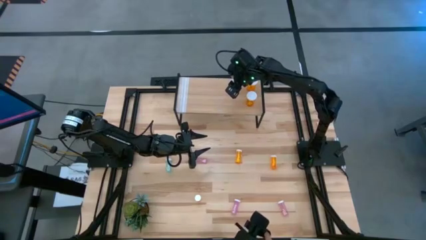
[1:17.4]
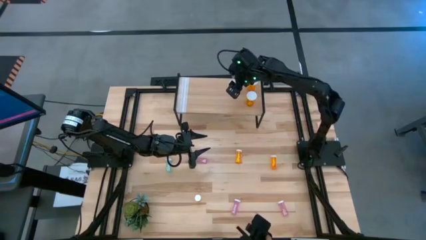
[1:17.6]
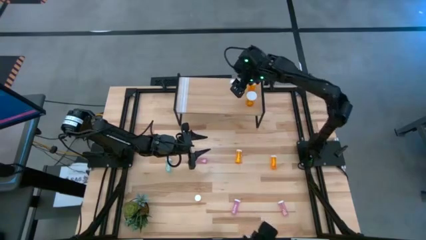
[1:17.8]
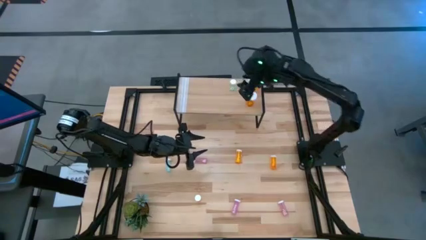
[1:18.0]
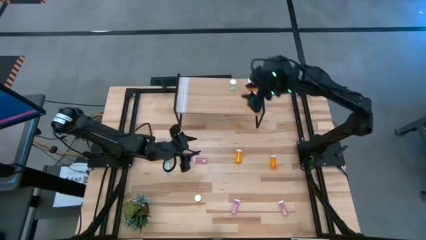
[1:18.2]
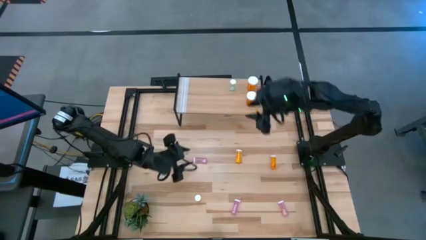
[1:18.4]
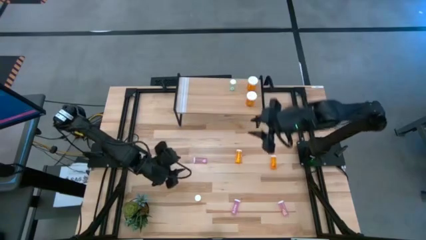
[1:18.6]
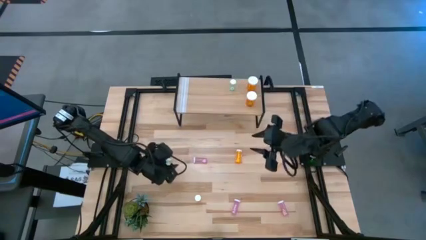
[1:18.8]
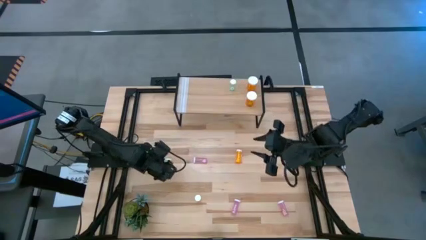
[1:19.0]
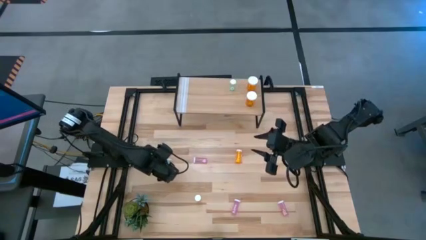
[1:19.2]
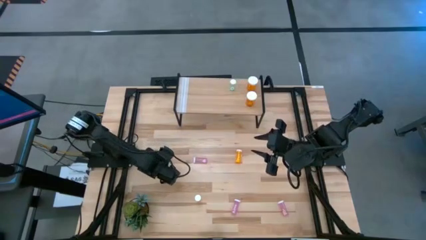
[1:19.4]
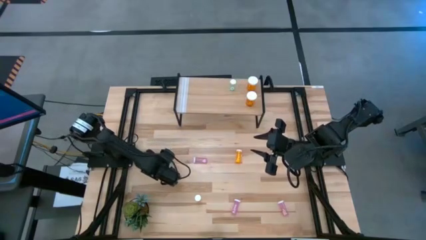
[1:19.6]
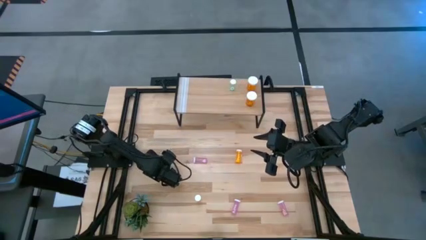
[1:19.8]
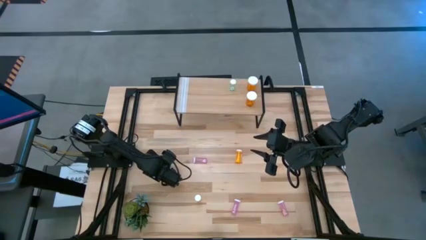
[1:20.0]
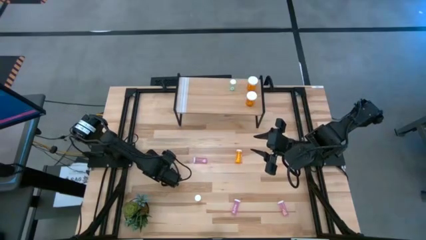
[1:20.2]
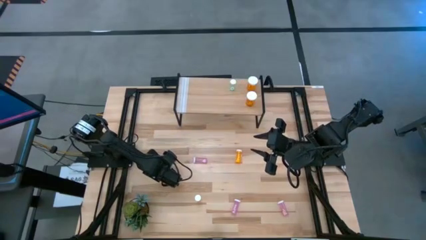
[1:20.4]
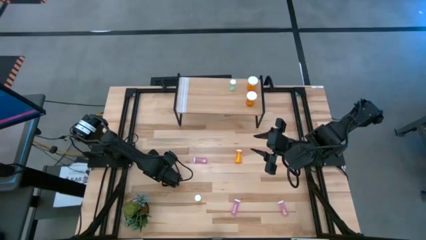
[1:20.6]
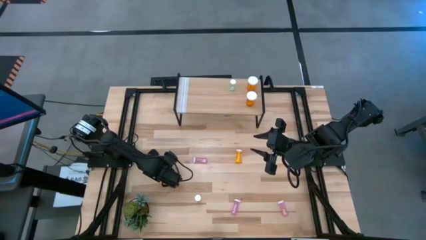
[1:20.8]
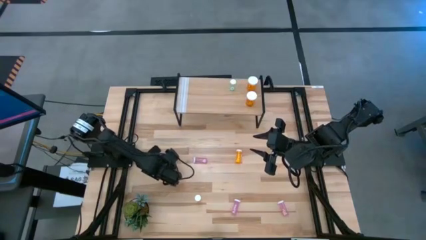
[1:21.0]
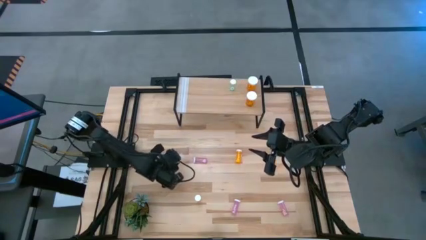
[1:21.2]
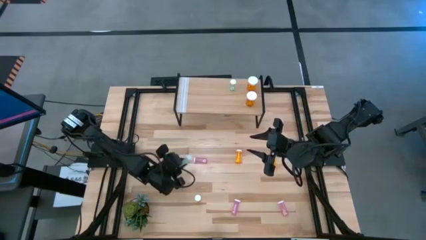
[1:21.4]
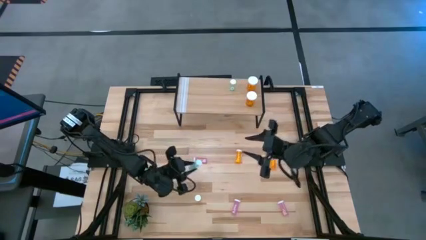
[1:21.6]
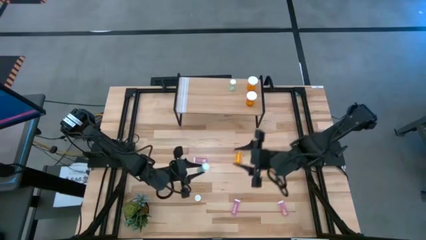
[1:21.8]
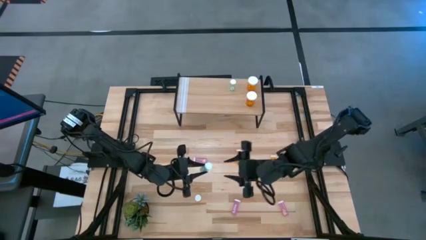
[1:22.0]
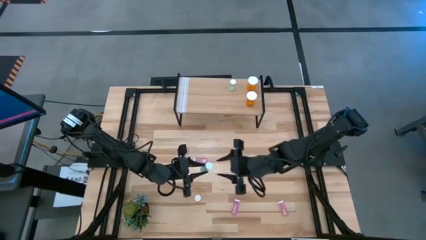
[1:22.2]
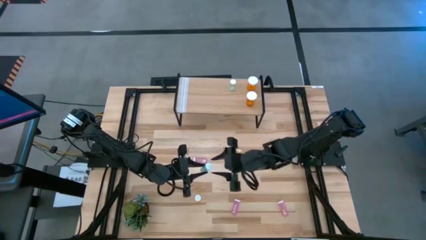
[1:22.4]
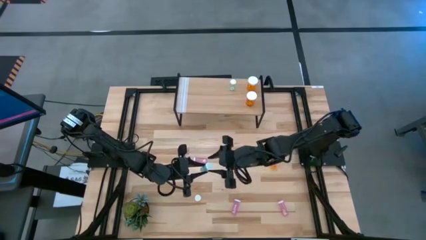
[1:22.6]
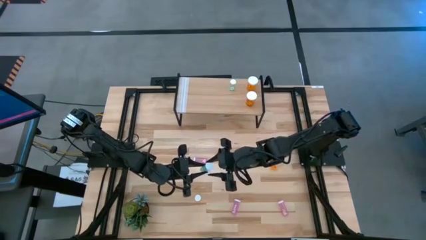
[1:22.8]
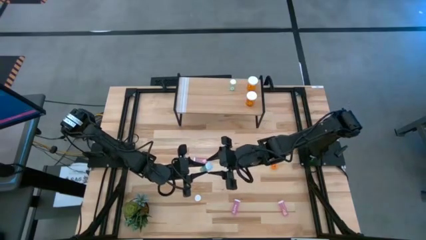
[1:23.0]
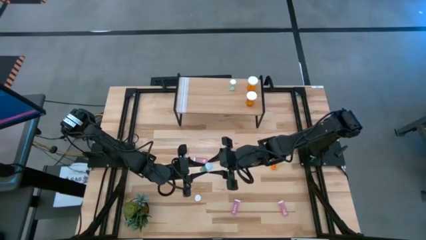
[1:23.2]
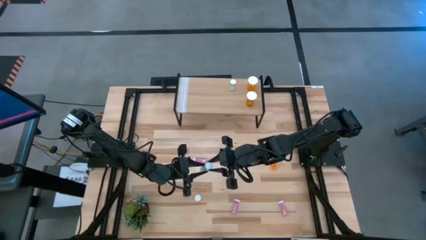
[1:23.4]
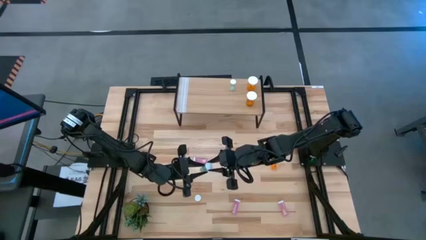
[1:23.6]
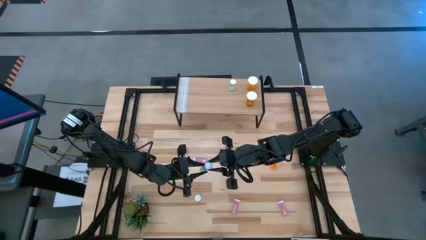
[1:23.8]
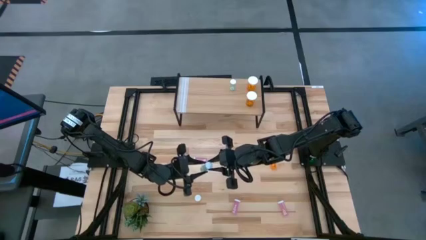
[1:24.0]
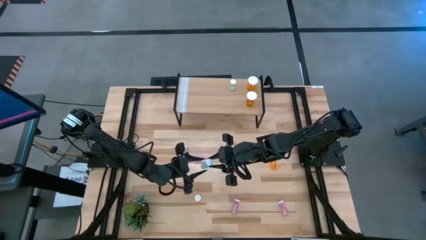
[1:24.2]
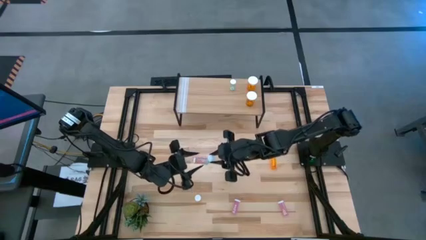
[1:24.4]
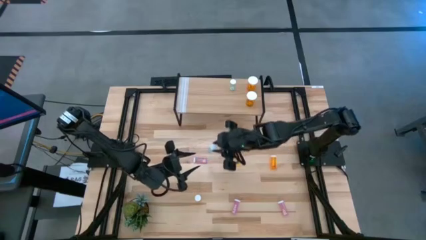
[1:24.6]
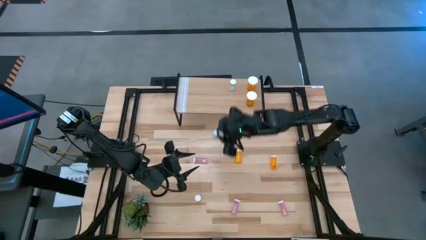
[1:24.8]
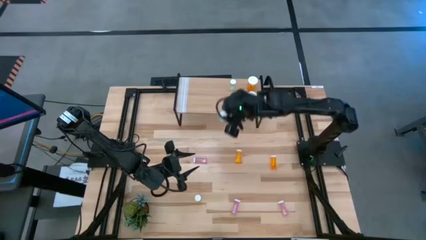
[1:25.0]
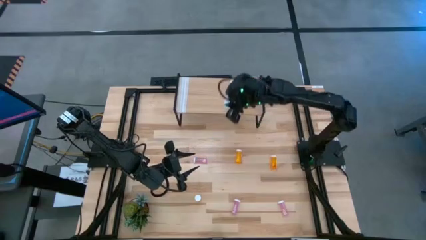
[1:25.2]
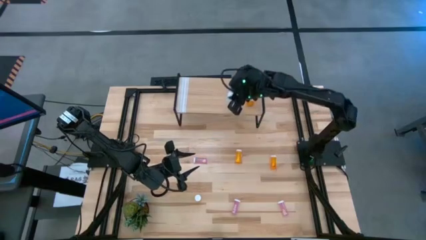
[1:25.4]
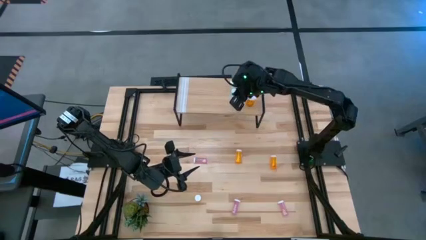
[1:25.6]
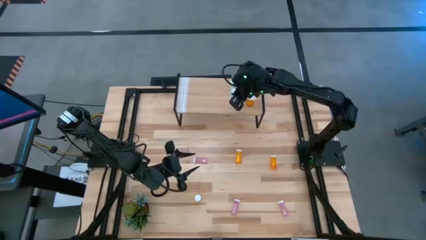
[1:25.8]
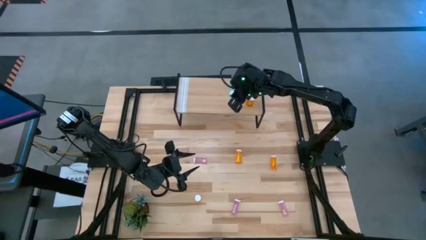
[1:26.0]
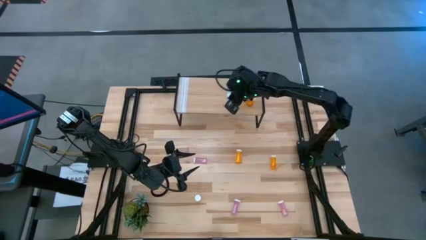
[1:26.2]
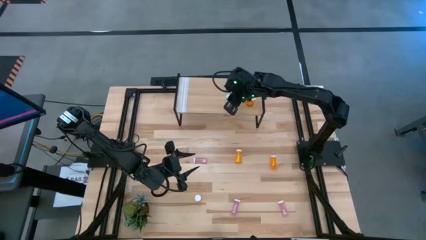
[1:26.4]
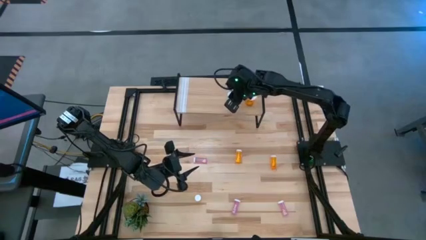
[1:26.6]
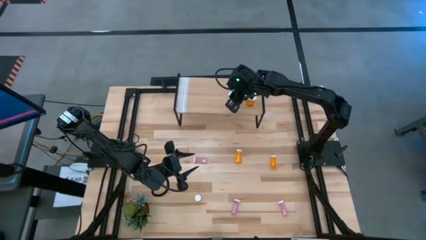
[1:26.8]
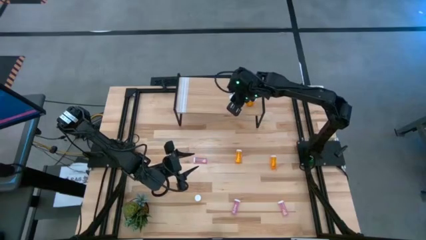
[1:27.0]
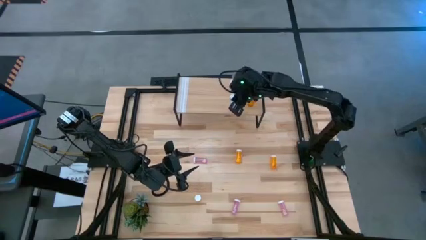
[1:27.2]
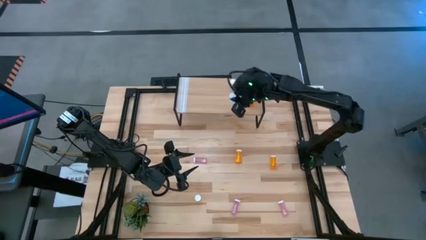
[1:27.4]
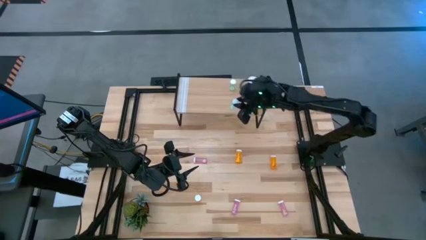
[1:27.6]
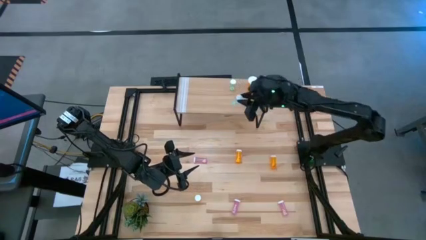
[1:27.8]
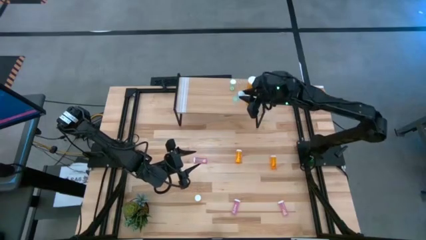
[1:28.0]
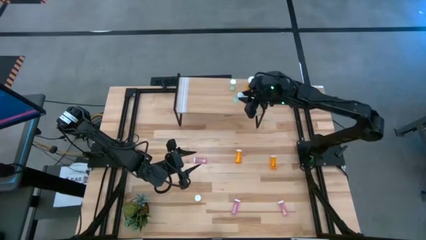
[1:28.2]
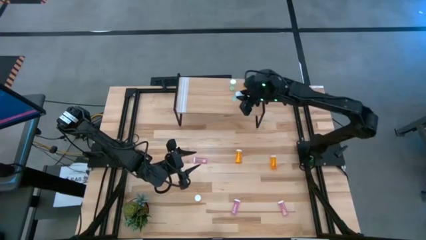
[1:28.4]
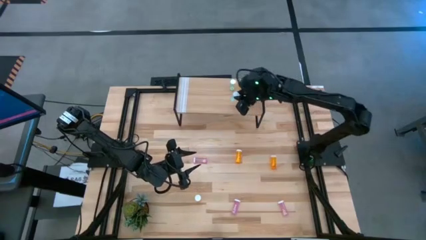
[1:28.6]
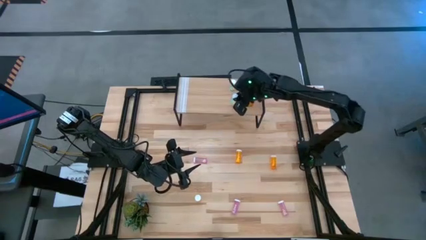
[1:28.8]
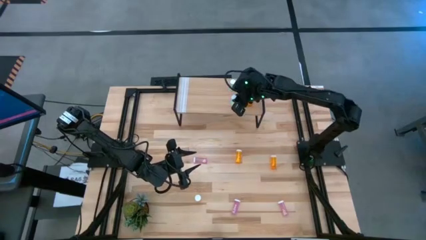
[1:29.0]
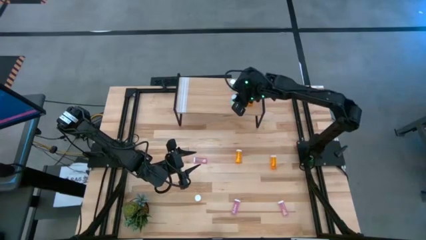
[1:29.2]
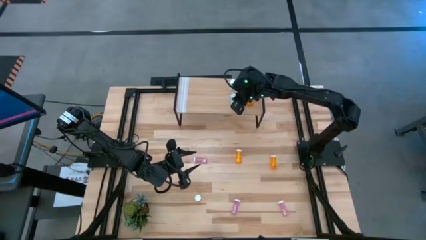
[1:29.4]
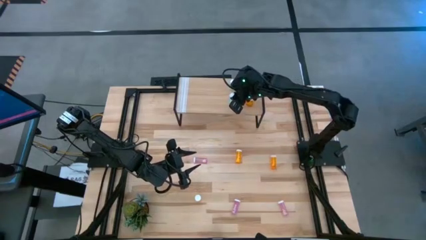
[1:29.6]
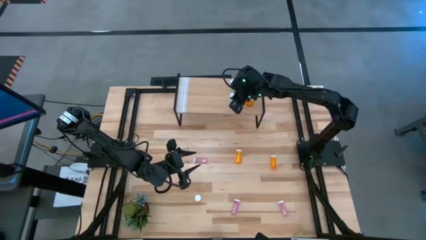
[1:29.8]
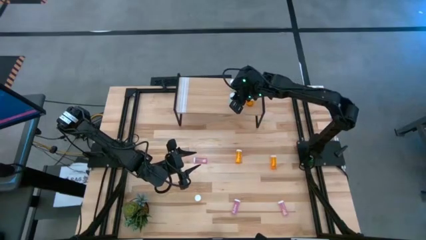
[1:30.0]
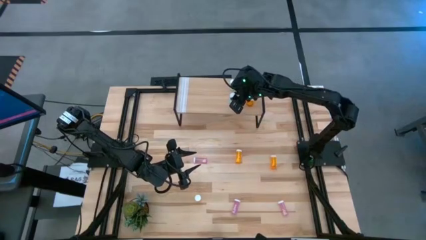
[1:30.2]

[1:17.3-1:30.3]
Task: Pick and place medicine bottles onto shelf by color
Put the small green pill bottle on the shelf aligned with the other small green pill bottle
